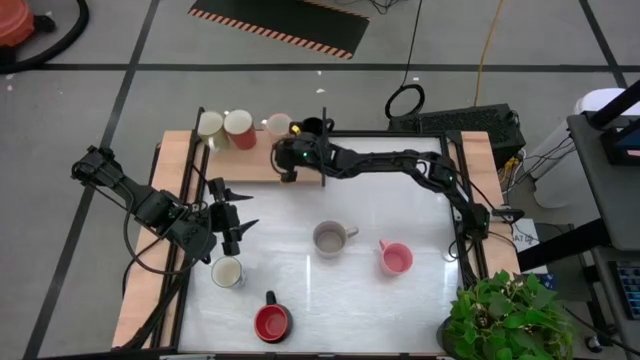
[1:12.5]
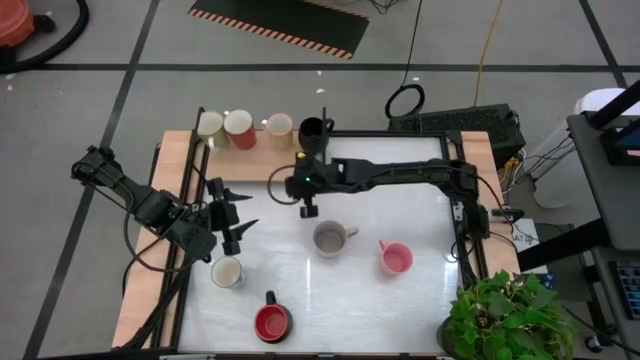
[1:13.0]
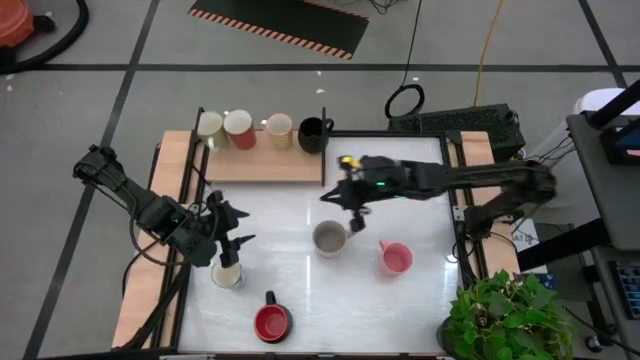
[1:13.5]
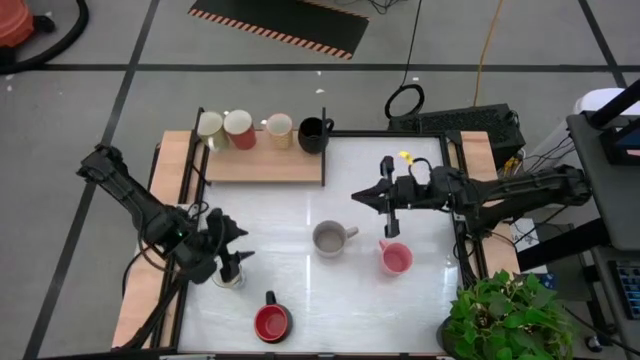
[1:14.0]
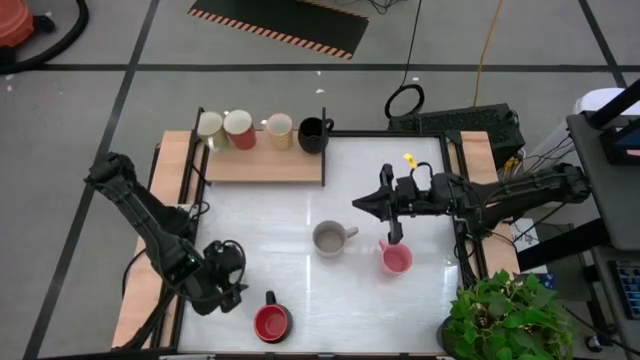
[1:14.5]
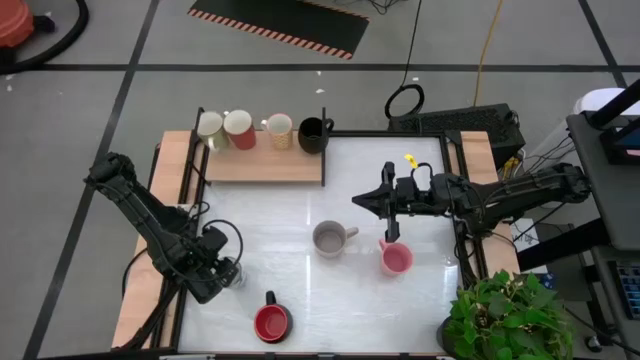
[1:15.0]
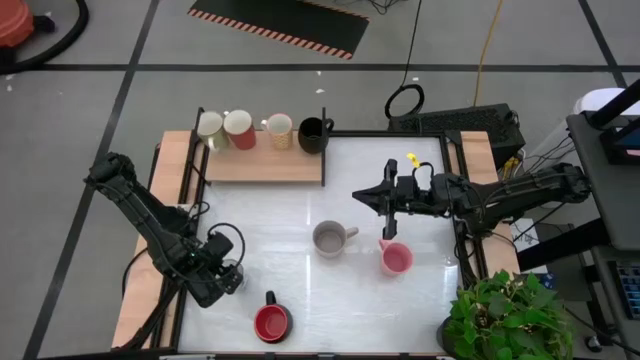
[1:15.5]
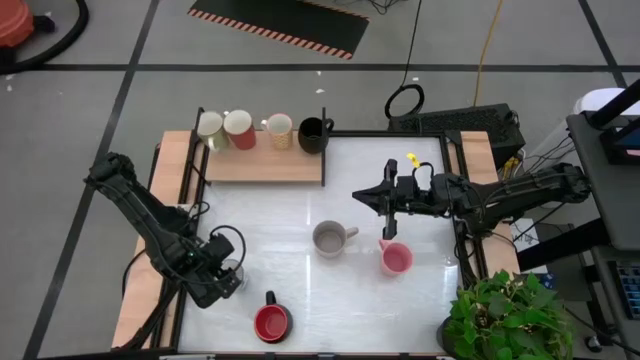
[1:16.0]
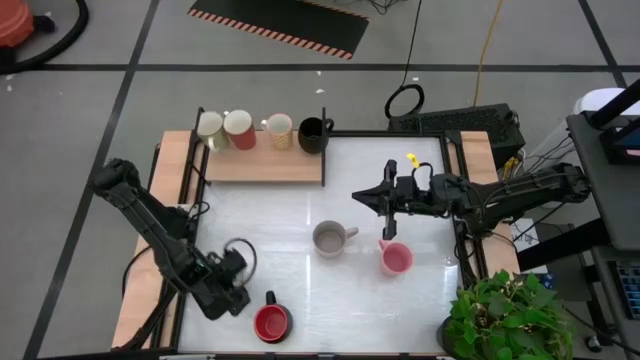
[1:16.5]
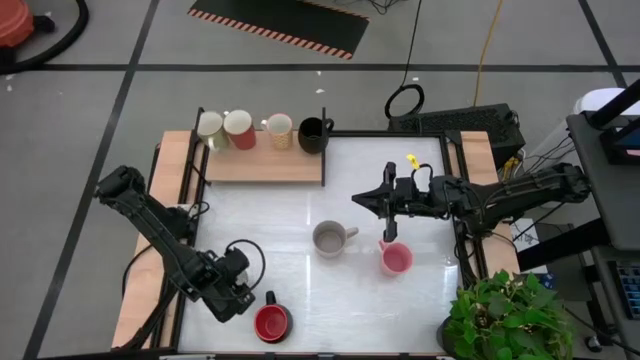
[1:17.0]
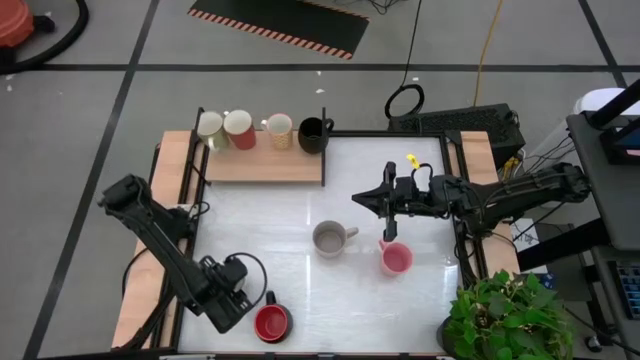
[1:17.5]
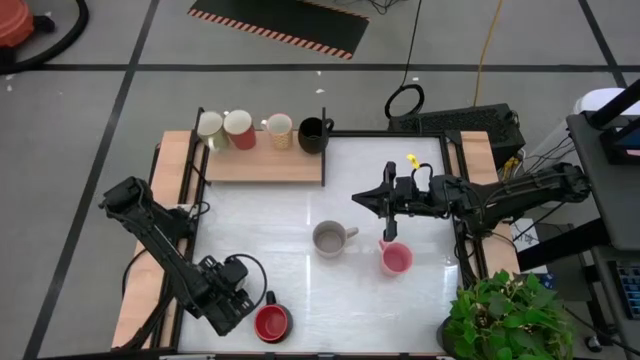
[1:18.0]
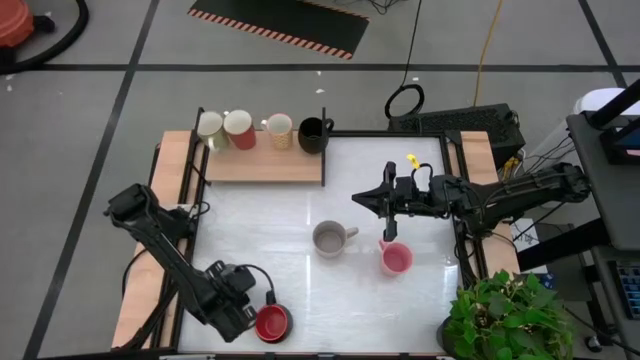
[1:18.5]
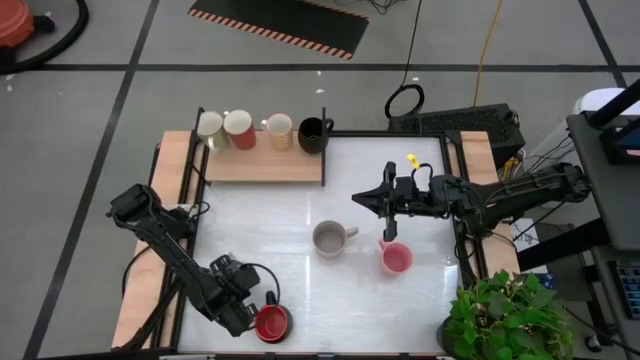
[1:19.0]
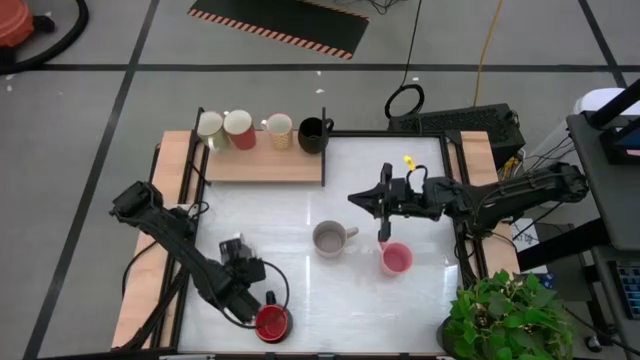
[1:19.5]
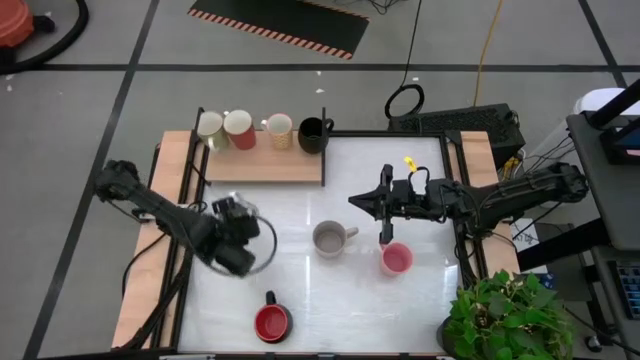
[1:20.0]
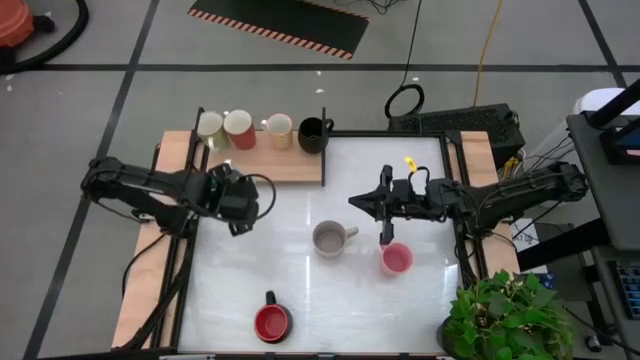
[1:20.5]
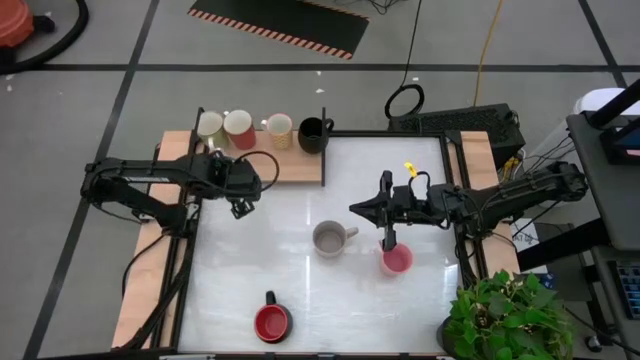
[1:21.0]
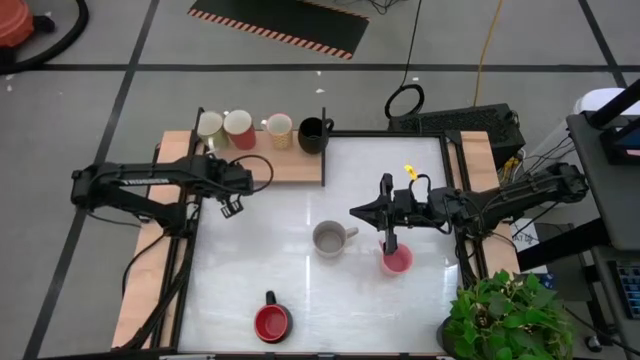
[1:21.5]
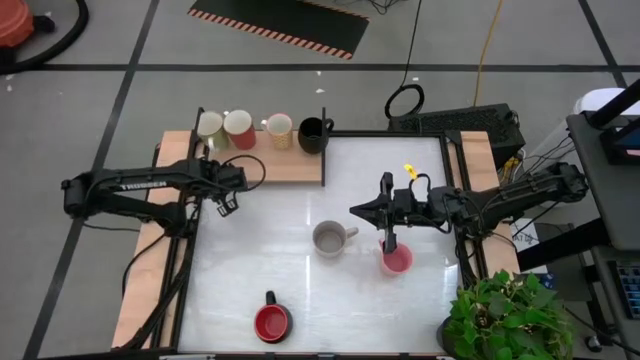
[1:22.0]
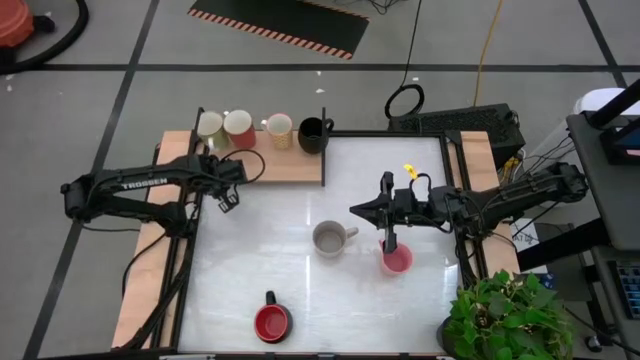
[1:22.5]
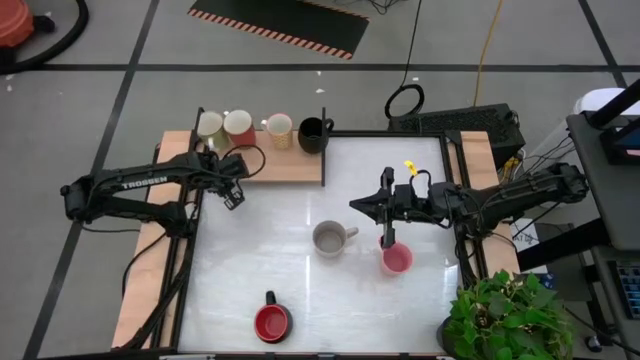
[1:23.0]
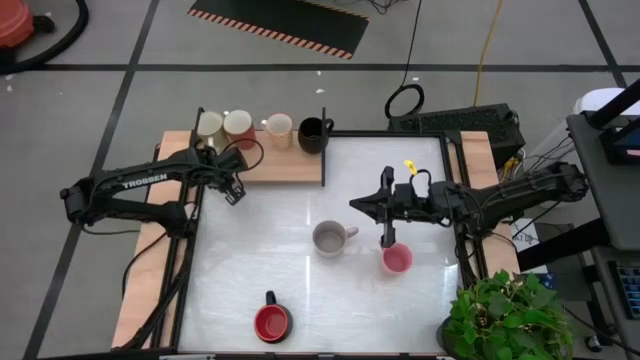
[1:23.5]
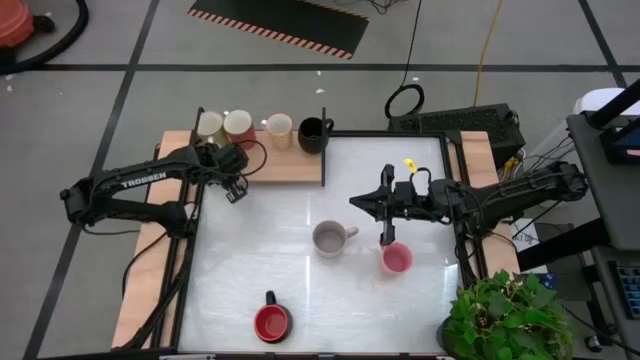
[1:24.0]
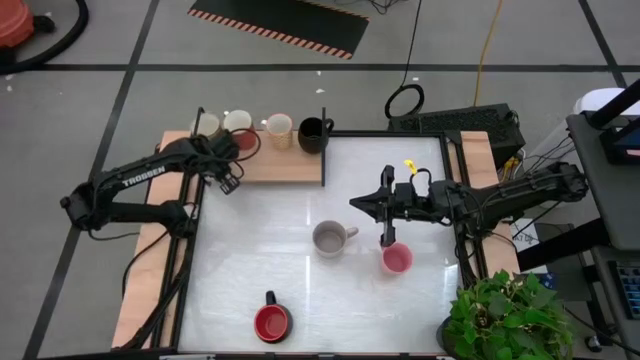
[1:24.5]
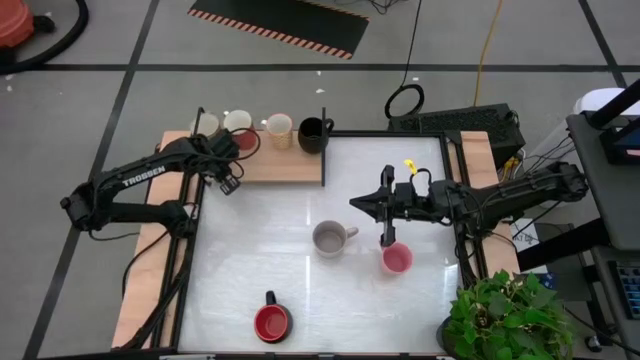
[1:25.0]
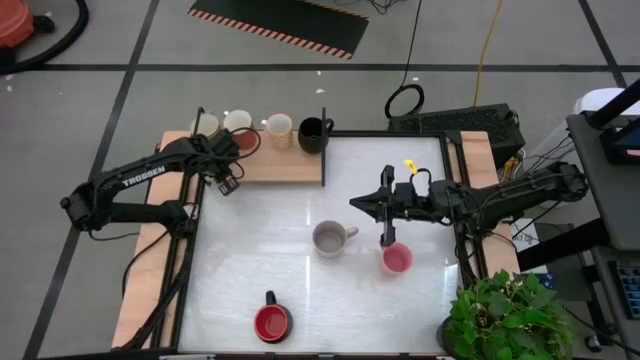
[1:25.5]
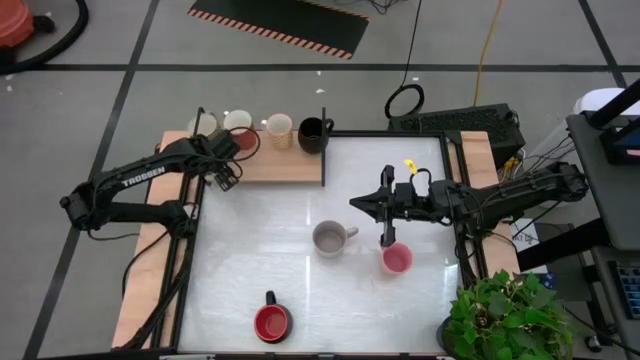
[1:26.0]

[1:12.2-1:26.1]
Task: Place coffee mugs
Put the blue patterned mug on the shelf

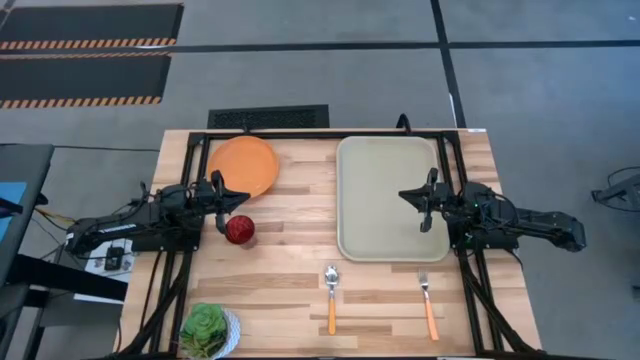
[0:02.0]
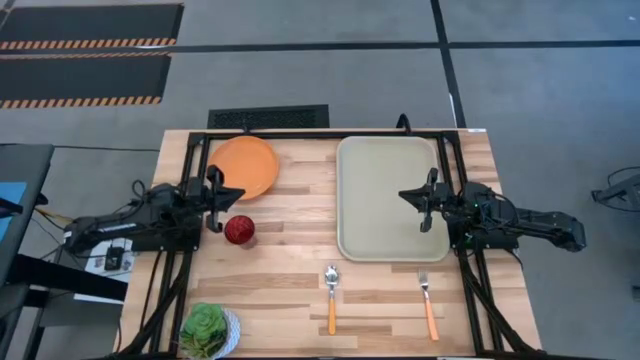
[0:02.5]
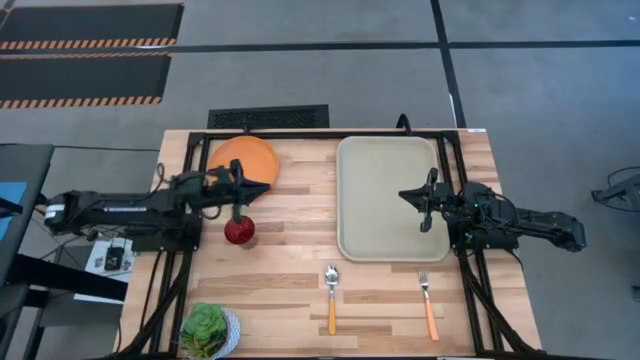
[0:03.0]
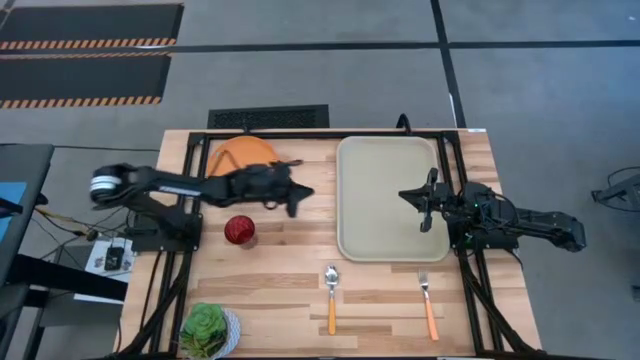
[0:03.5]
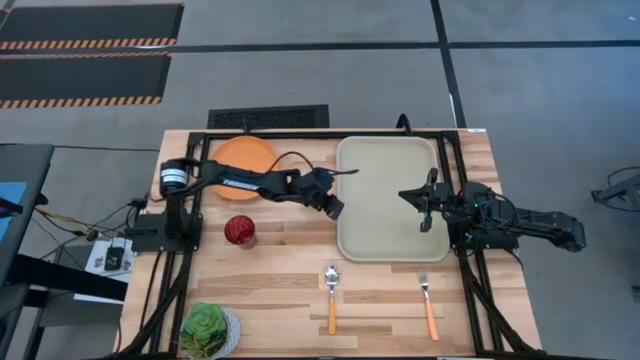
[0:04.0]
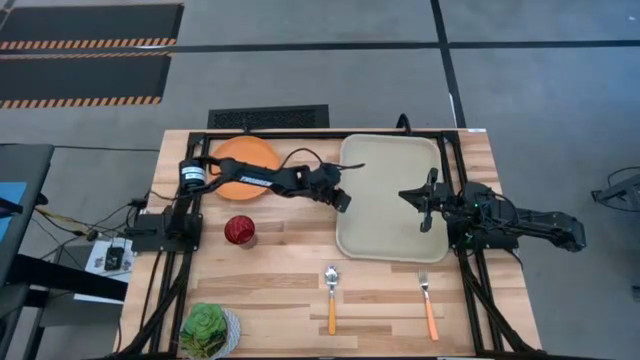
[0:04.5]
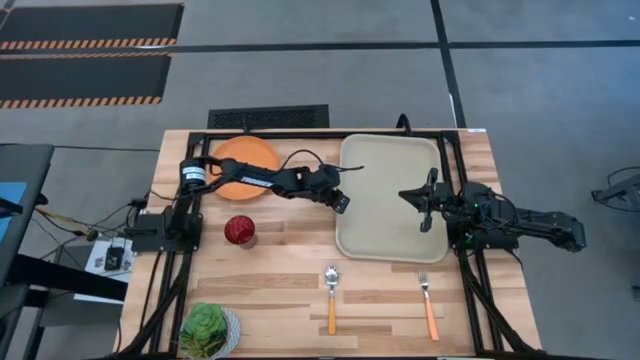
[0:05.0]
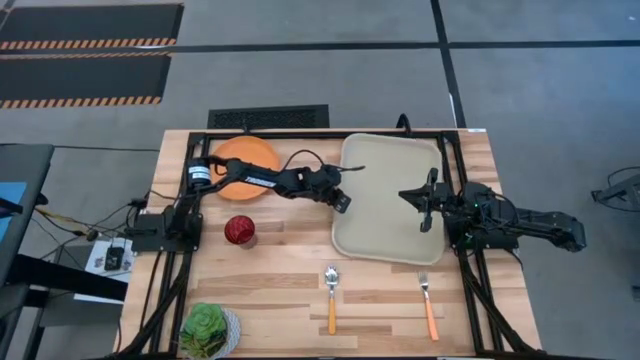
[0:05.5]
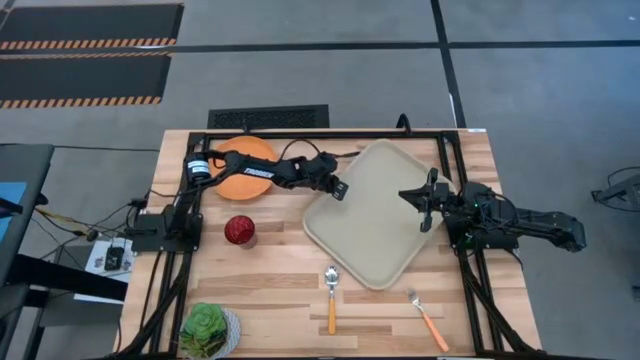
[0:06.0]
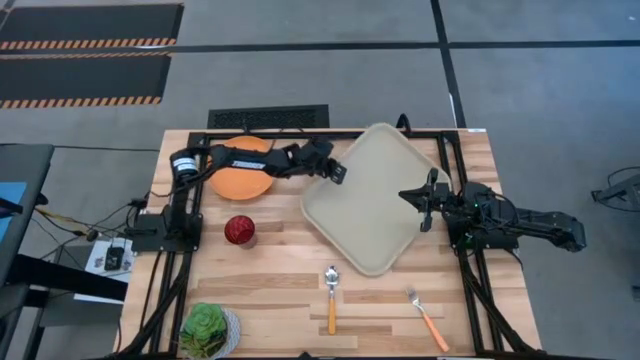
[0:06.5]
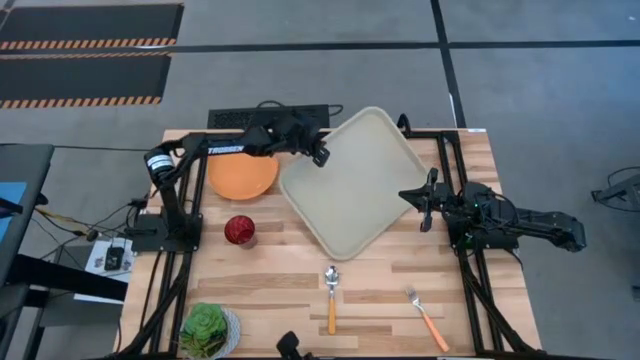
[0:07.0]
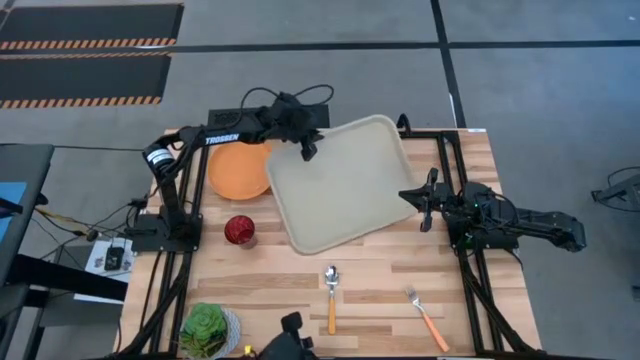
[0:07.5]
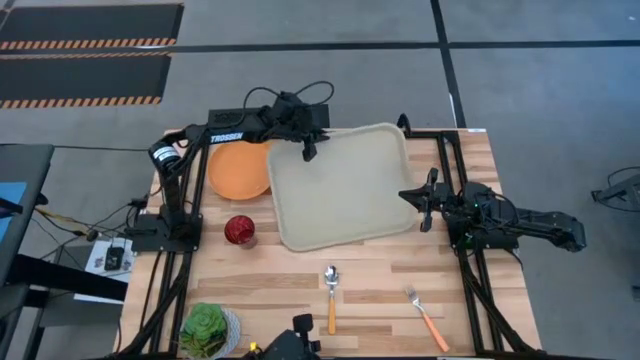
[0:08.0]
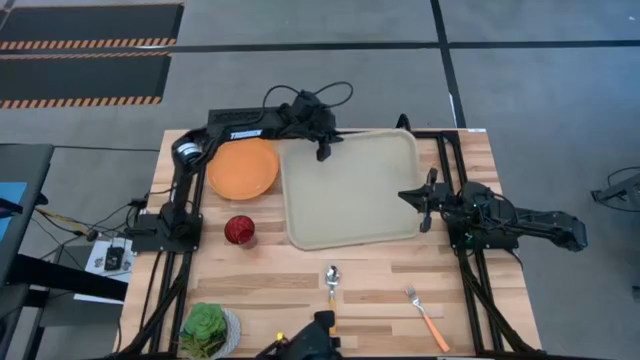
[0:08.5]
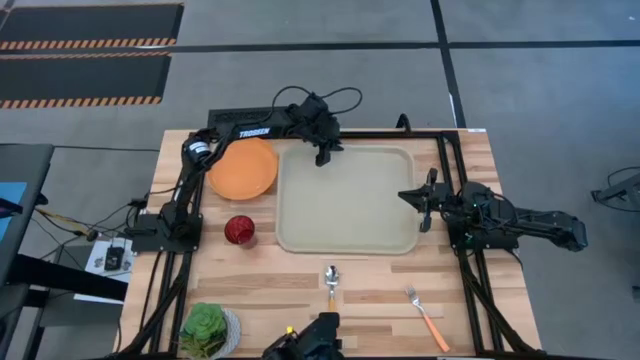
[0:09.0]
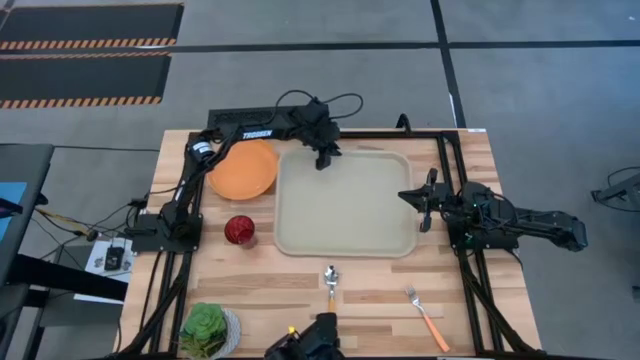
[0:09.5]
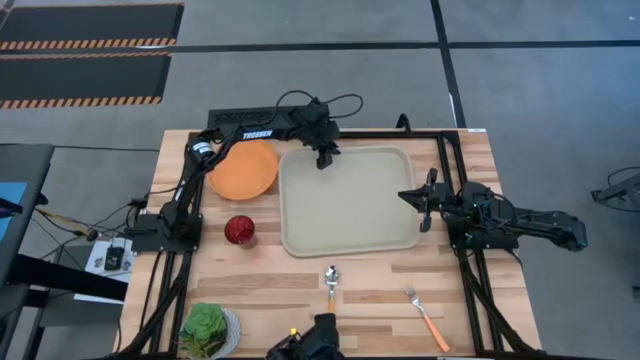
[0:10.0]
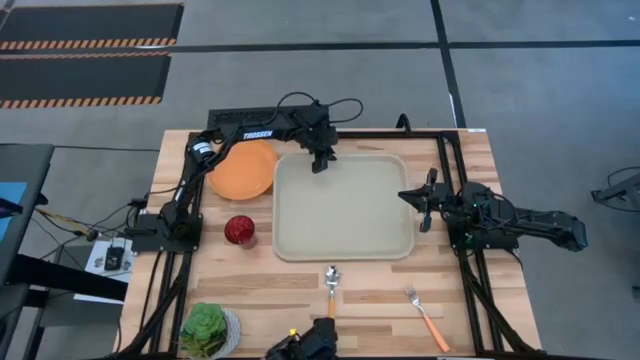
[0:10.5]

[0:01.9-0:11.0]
Task: Pick and place plate/cup/fork/spoon on tray
Prepare the gray serving tray
